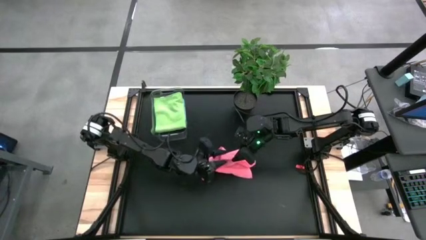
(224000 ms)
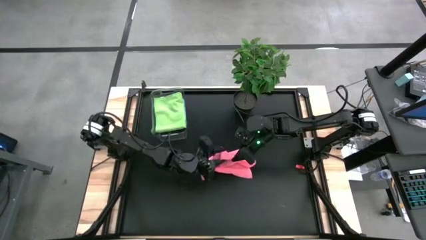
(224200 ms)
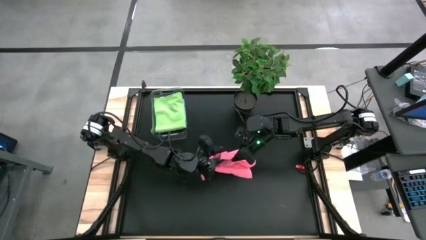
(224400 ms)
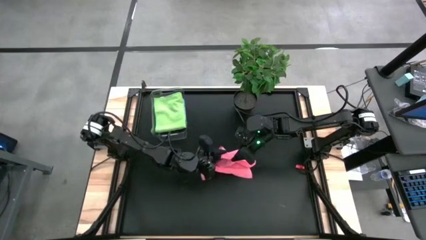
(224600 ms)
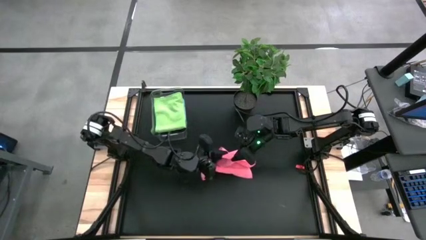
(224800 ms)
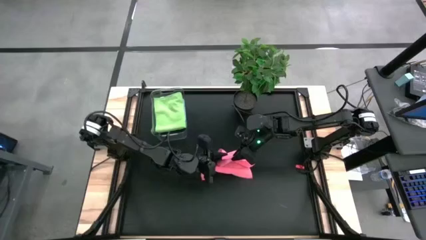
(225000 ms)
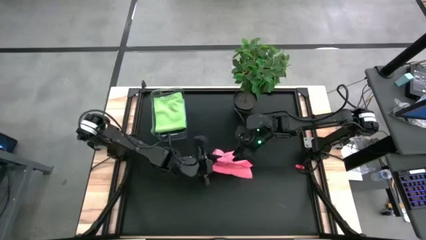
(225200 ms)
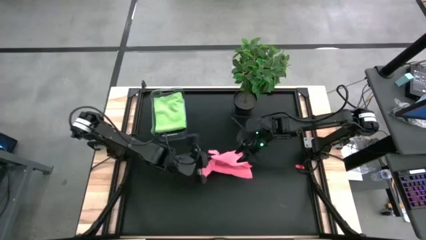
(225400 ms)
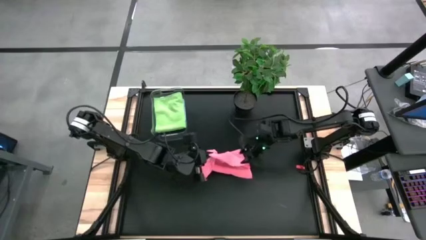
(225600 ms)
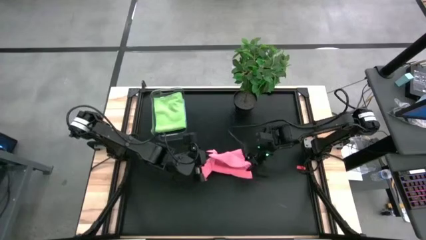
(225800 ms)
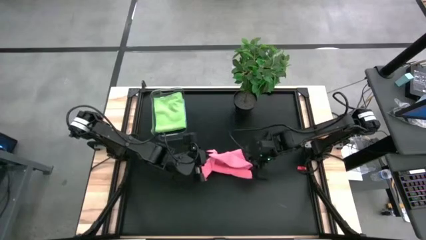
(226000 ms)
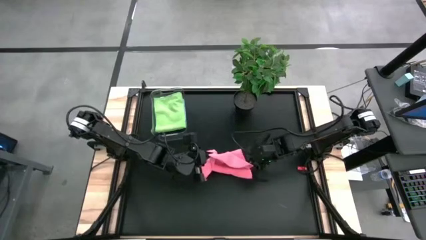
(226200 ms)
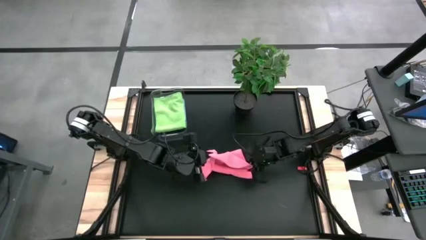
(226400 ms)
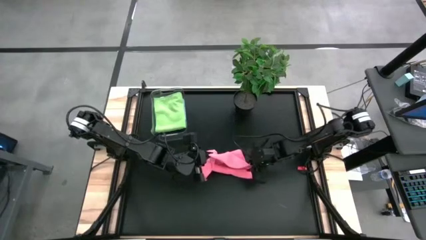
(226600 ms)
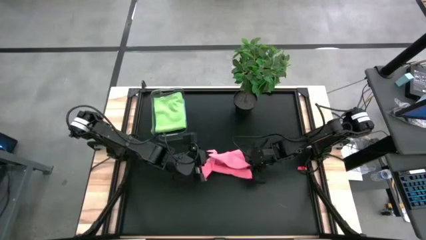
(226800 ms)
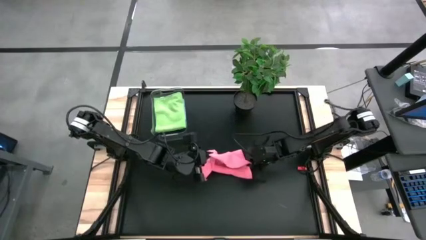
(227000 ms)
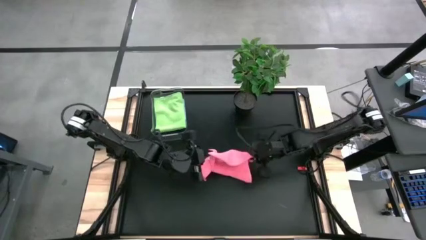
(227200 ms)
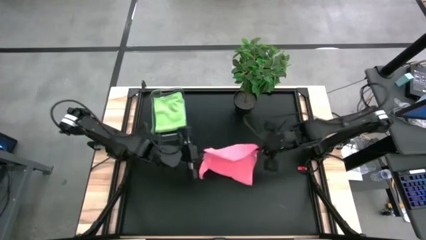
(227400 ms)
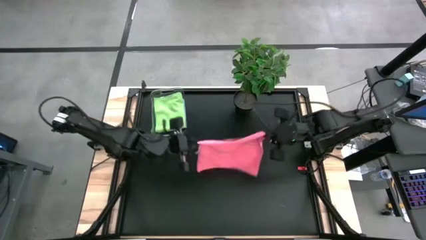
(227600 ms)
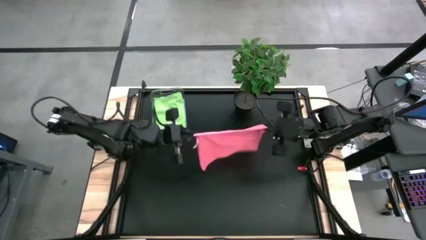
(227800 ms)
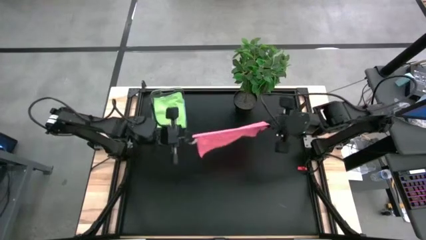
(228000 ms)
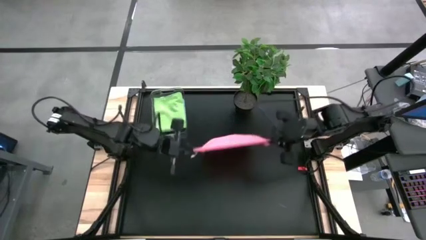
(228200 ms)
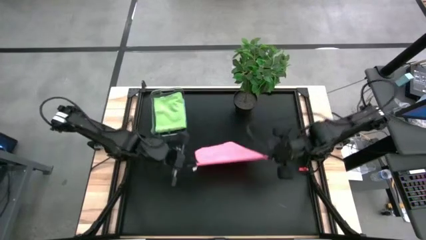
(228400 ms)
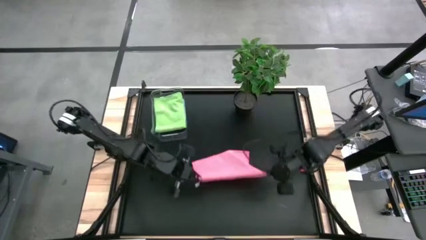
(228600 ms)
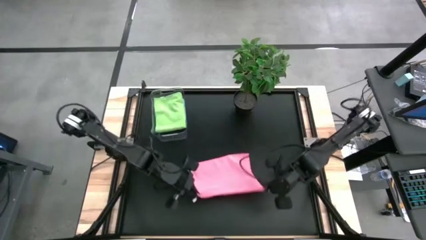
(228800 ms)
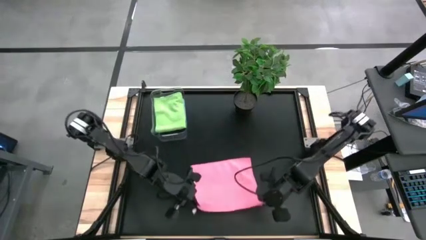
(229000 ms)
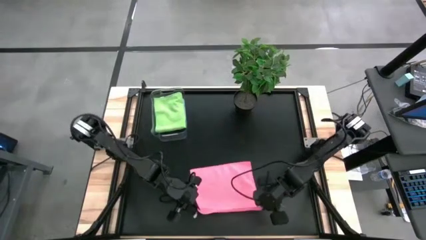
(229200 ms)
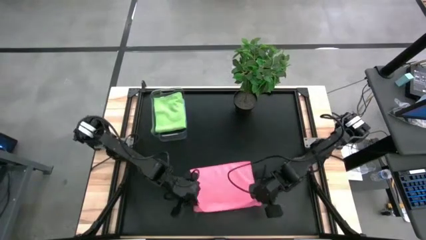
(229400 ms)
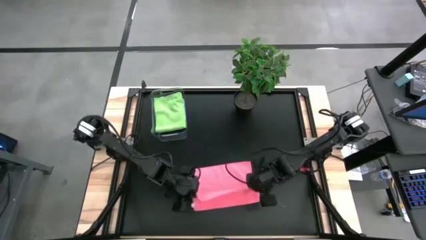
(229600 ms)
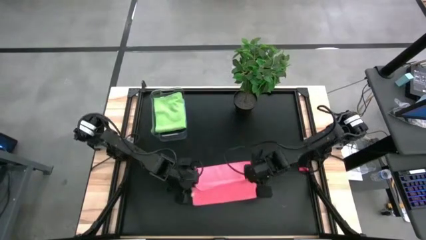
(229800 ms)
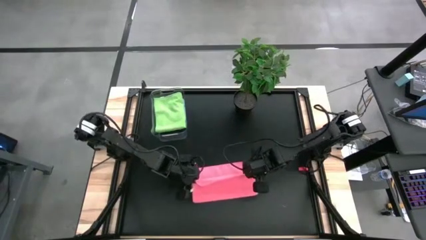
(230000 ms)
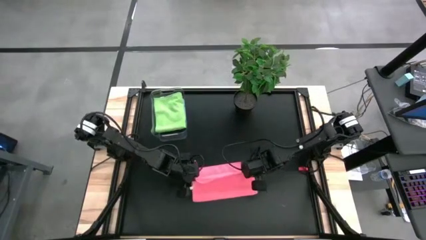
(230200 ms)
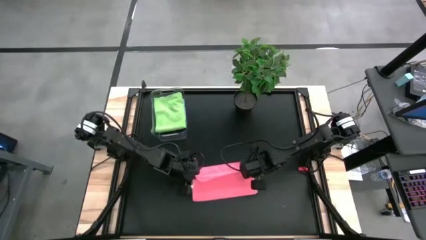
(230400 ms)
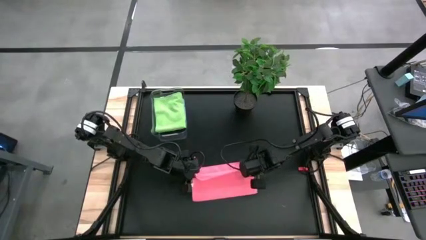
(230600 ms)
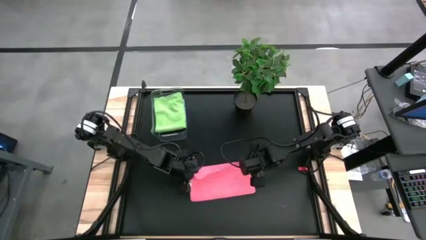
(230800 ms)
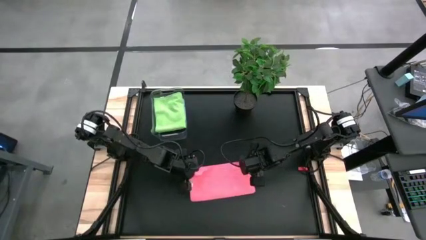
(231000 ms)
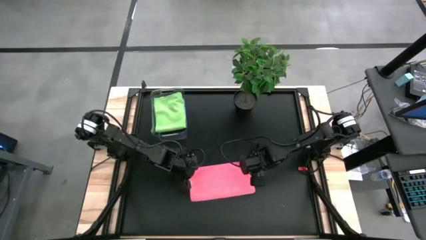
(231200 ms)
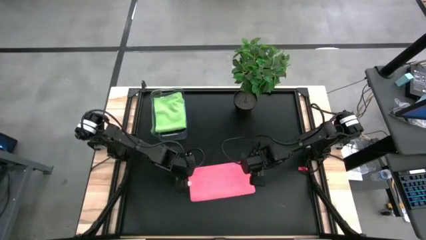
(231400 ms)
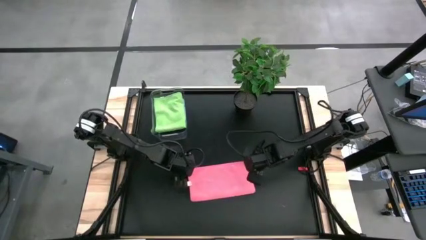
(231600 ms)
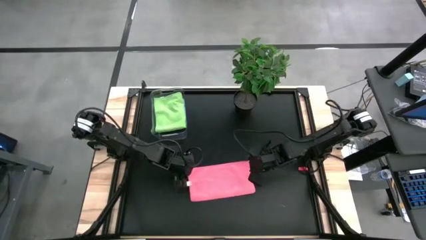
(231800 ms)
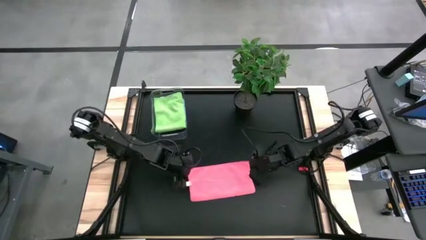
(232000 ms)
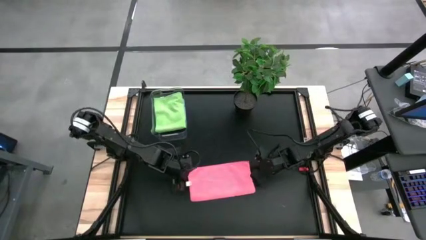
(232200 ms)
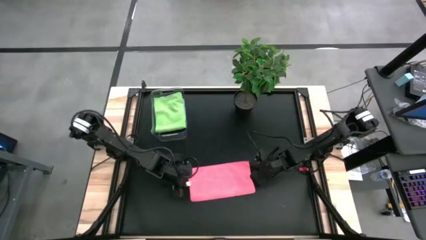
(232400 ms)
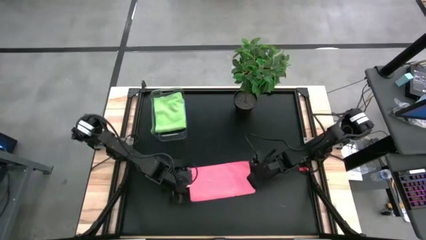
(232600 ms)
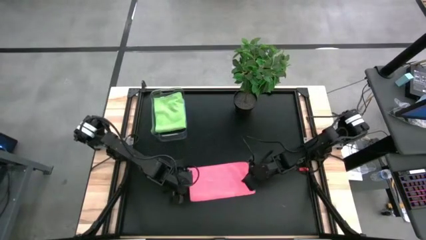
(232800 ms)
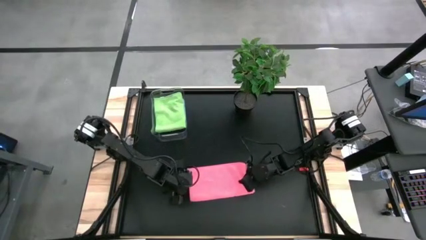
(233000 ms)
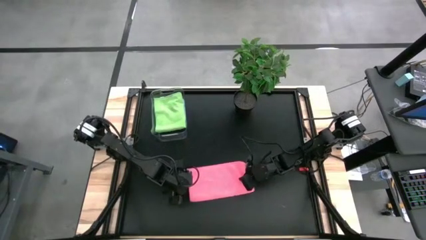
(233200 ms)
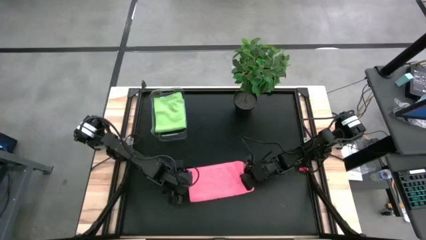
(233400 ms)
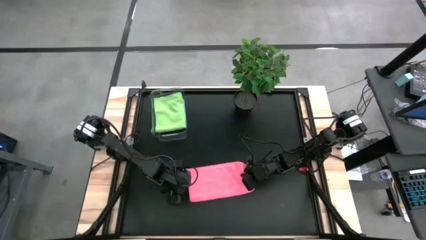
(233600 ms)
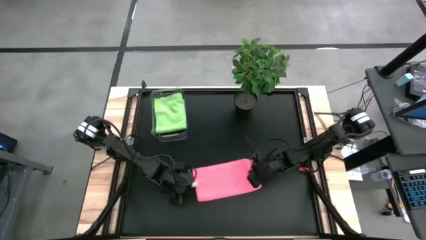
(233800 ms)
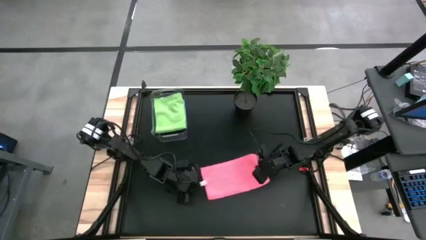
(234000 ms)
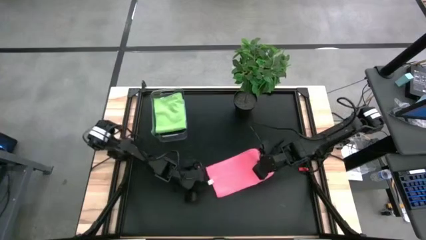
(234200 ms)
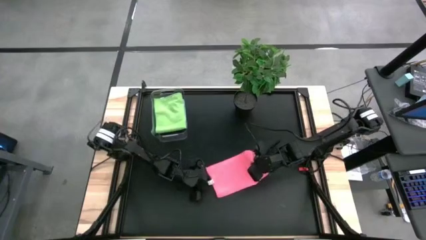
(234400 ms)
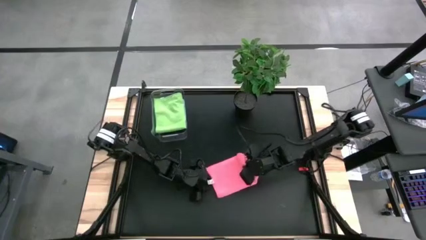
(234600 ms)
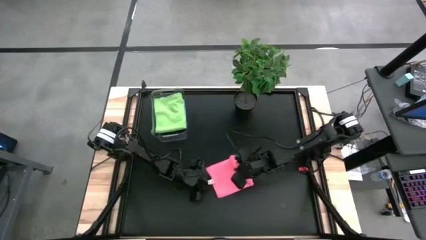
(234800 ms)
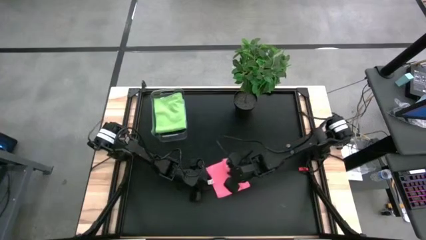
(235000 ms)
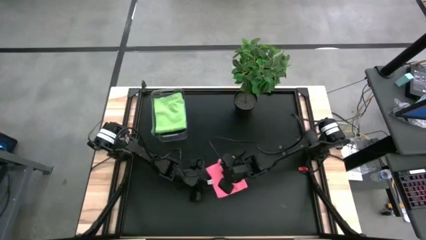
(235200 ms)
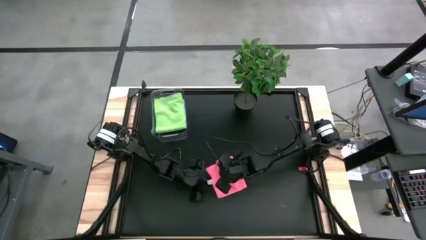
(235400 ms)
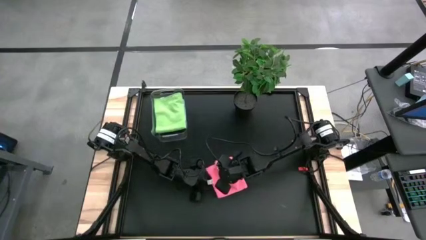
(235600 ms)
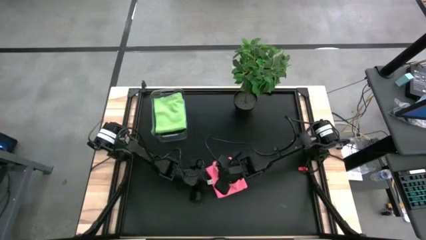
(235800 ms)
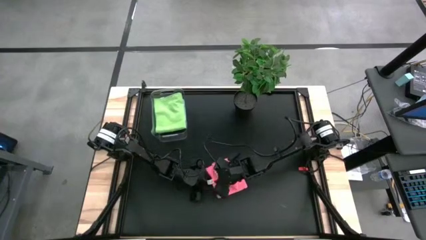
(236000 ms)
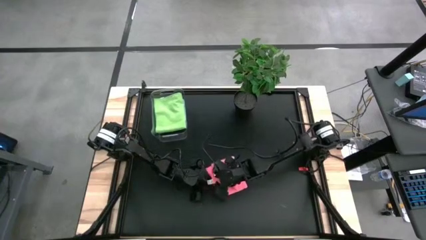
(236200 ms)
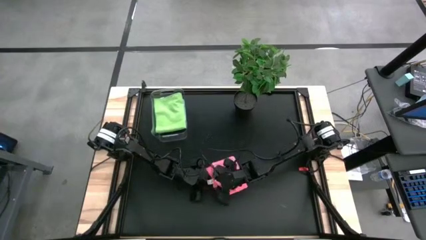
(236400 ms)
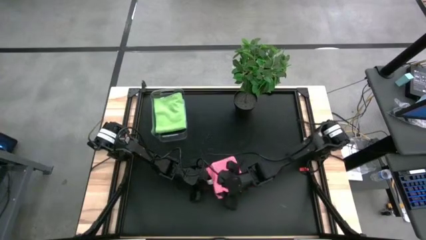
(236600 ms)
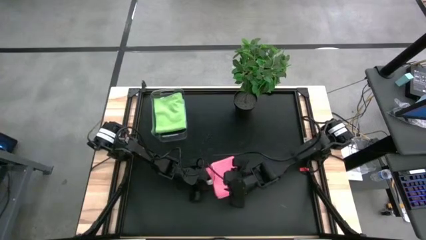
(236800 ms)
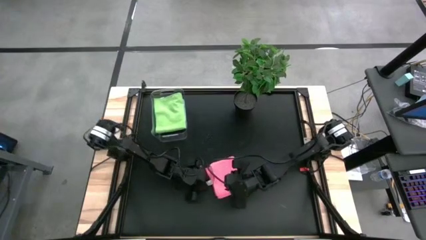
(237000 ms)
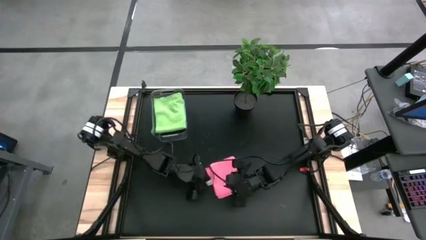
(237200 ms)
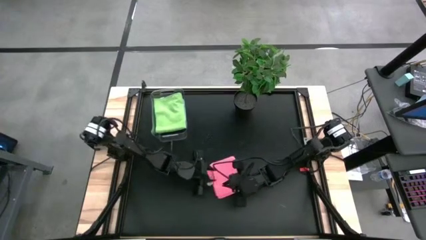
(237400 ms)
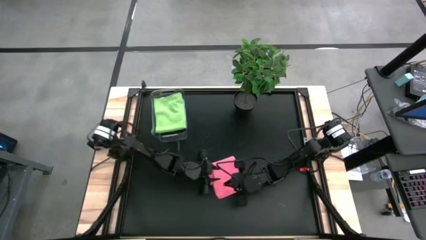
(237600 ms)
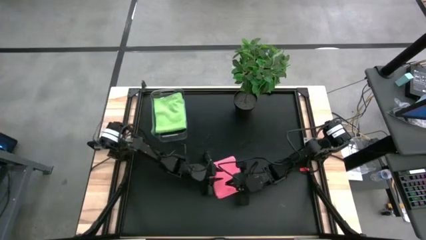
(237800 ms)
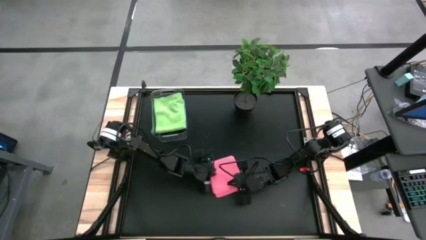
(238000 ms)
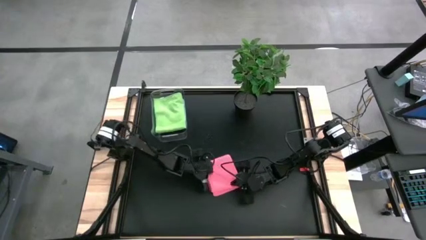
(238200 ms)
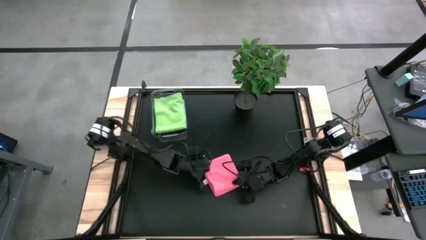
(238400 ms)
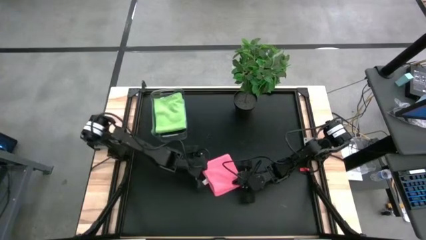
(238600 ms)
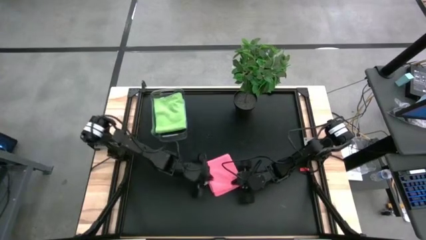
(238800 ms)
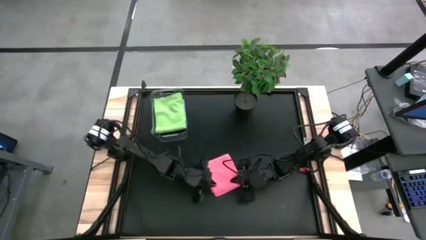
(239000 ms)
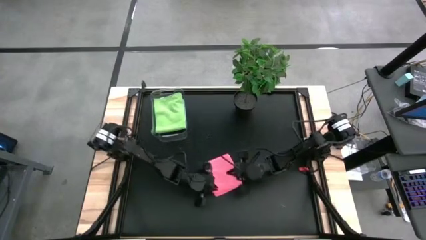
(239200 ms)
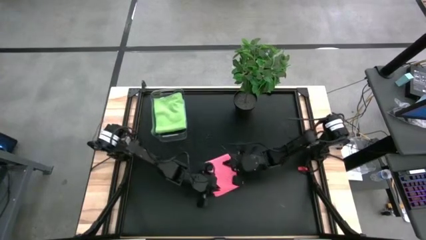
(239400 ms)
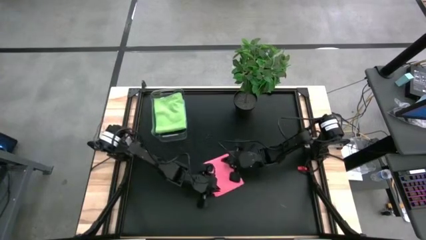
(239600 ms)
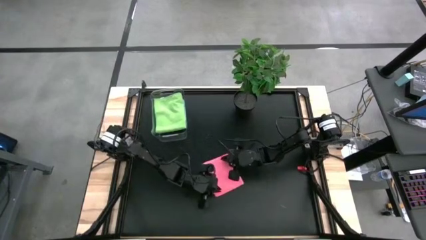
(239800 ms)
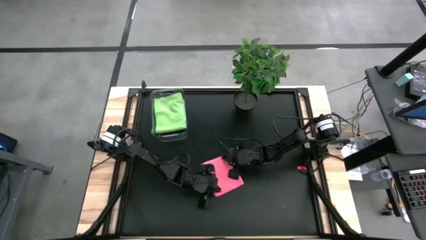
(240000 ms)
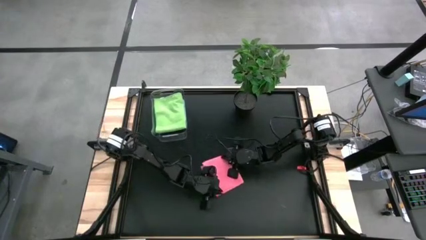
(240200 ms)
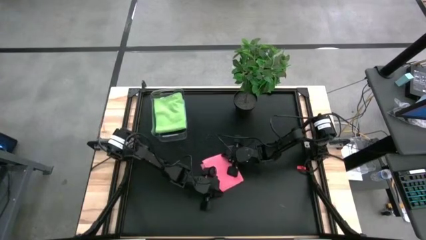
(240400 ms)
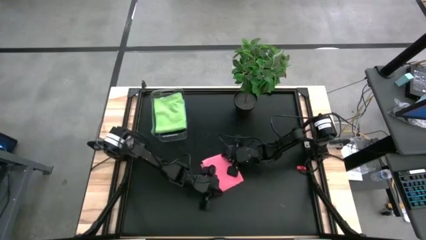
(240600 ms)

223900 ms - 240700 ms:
Task: Fold microfiber towels
Fold the pink microfiber towel
